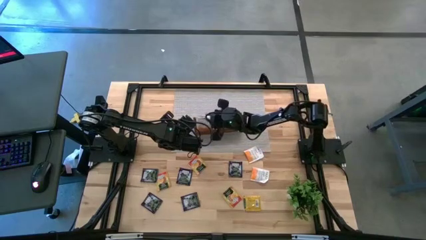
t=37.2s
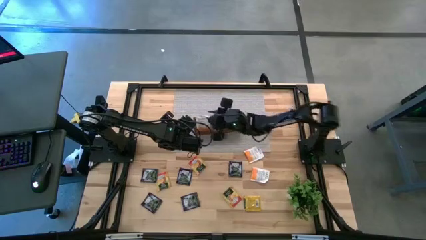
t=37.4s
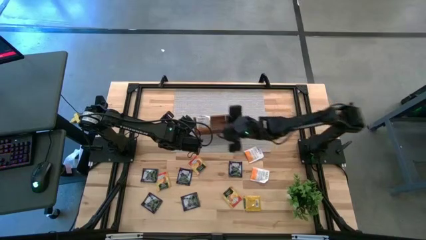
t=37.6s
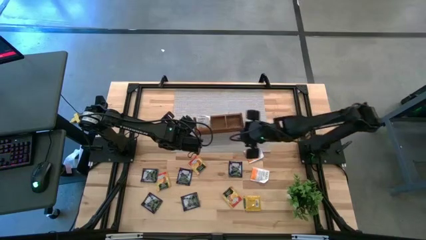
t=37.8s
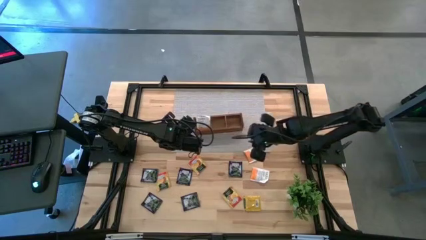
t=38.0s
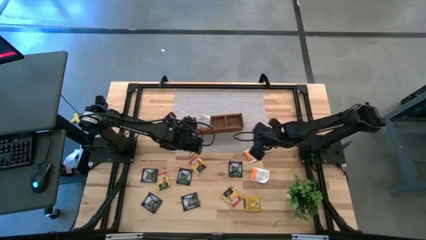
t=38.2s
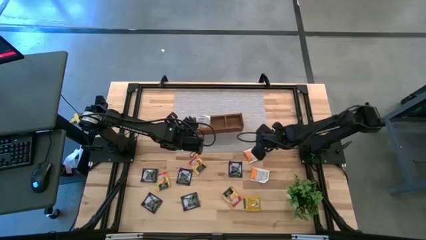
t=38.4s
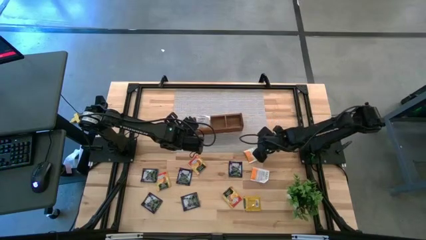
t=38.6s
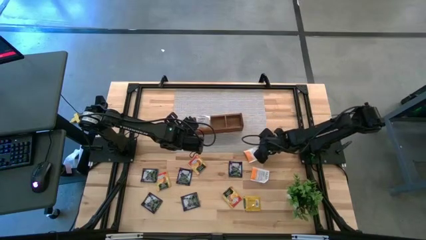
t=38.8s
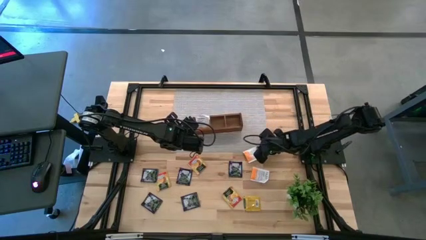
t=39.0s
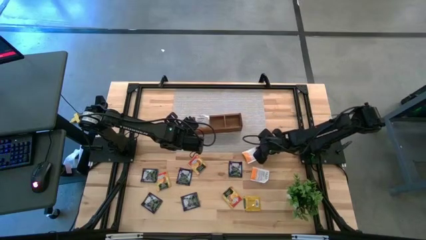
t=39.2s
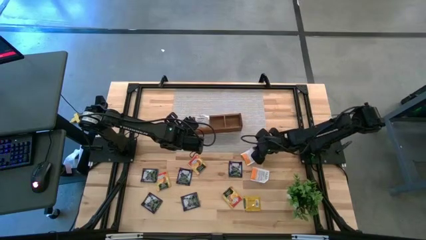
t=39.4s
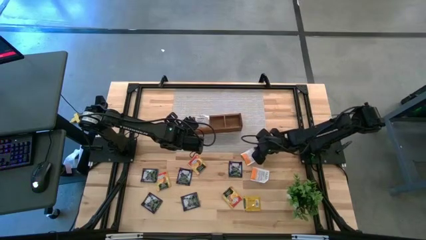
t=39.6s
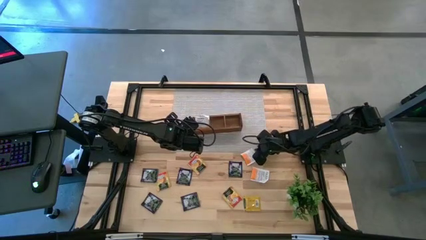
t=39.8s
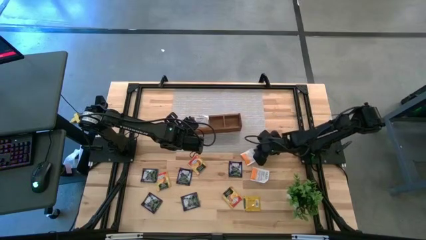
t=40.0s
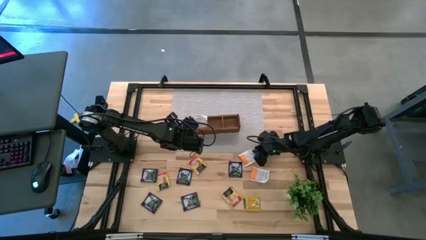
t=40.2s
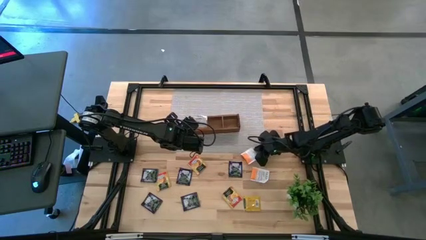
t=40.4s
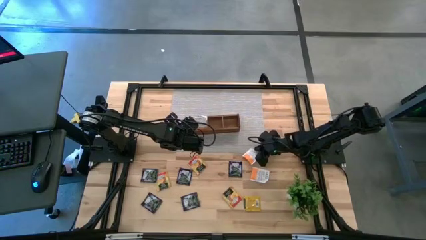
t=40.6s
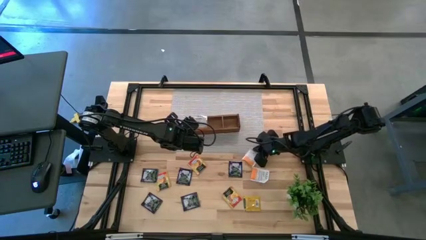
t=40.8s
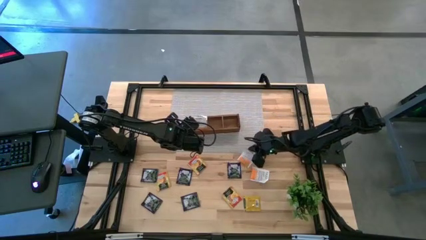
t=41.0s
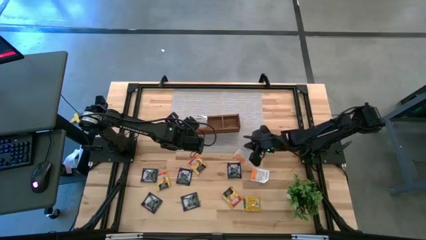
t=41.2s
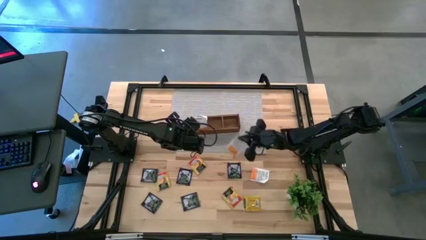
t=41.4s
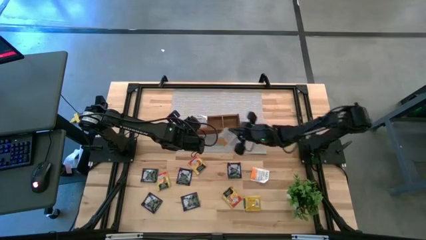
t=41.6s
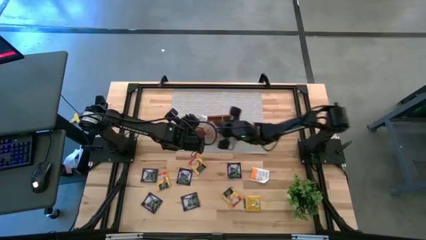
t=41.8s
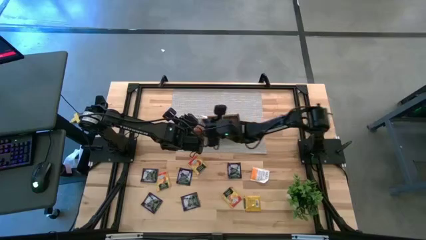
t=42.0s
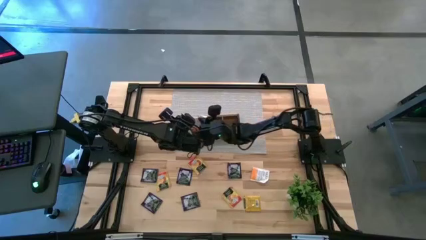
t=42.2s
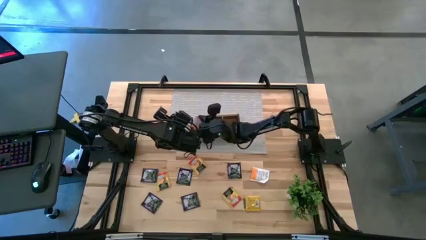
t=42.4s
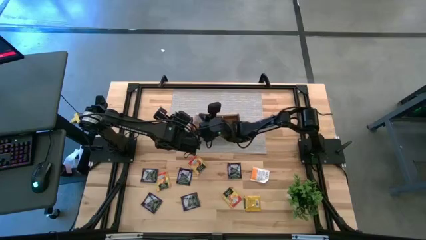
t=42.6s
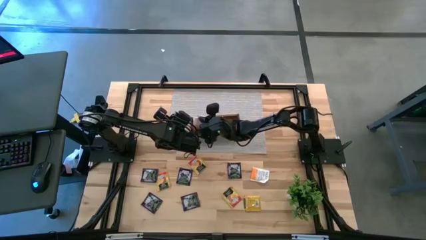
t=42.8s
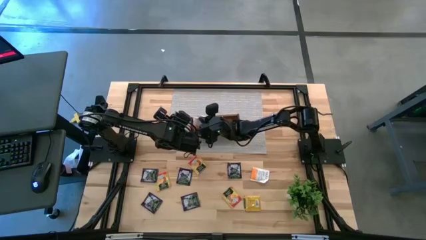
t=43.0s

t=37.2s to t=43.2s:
Task: Pick & Place Tea
Put the orange tea bag into the left section of the wooden organizer

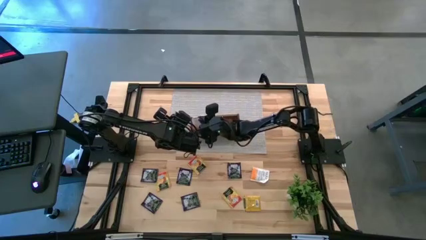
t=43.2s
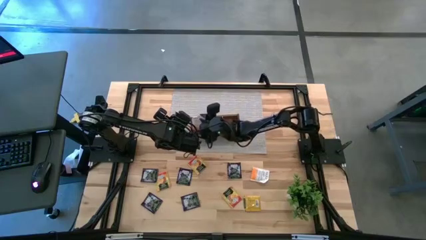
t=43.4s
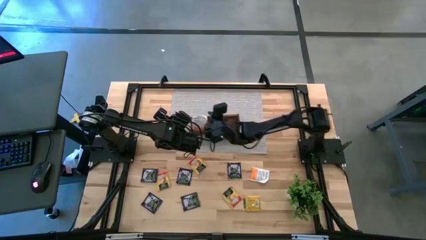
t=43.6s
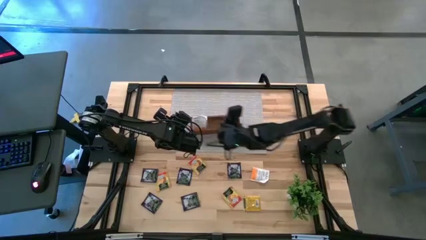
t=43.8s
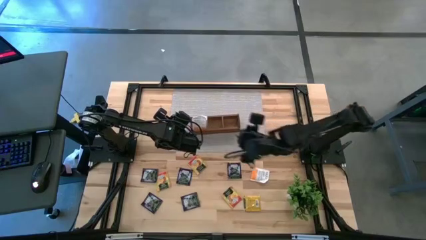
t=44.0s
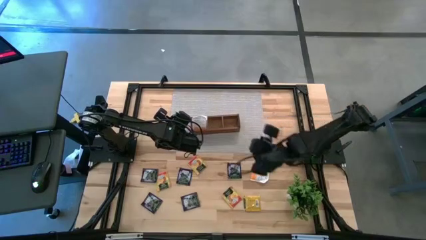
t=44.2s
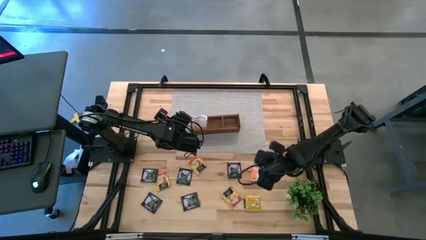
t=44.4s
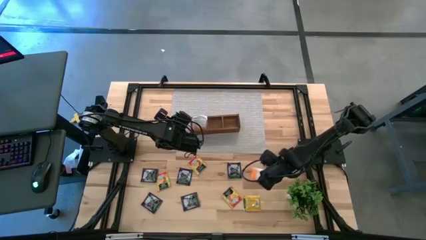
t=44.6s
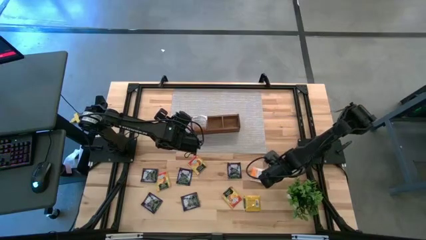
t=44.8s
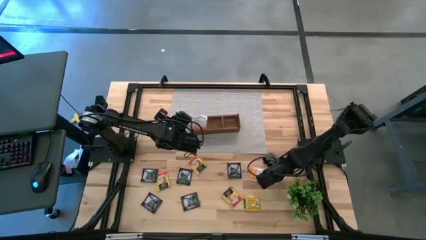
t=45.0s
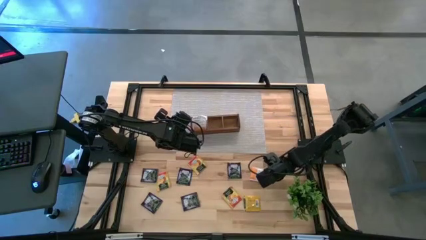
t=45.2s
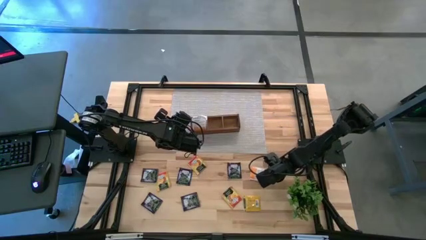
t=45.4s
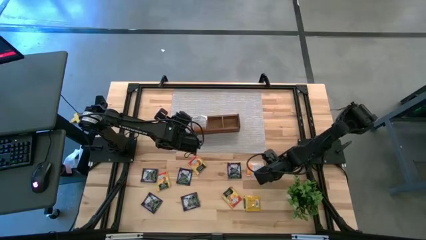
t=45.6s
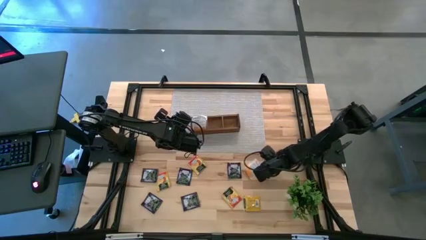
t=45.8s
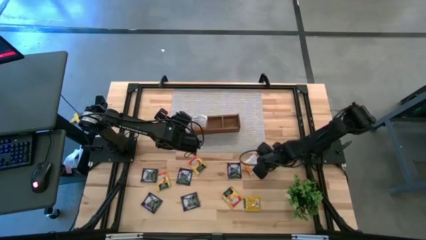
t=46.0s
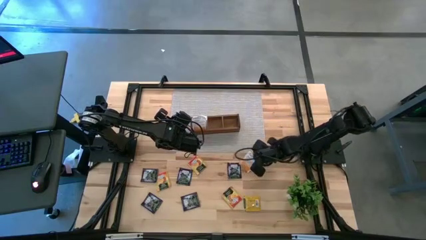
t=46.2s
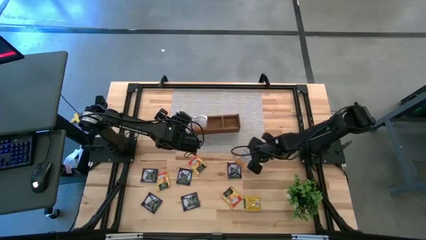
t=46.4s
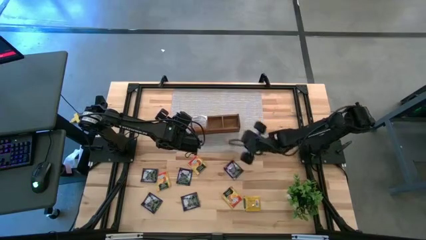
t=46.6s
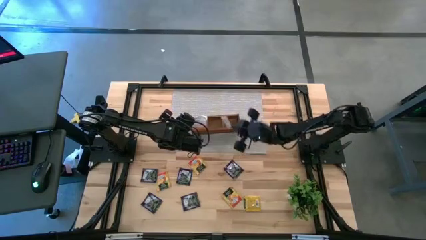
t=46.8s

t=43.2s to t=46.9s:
Put the orange tea bag into the left section of the wooden organizer

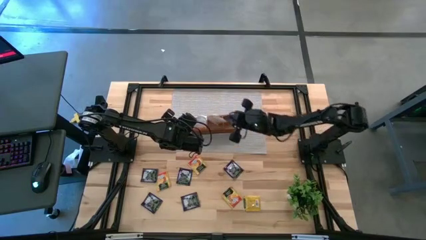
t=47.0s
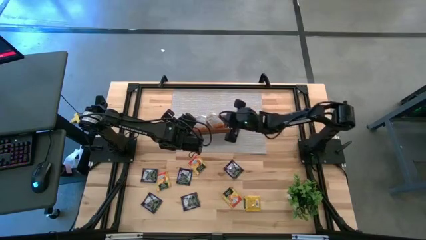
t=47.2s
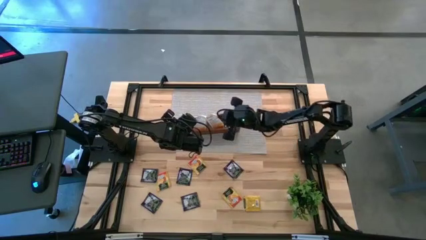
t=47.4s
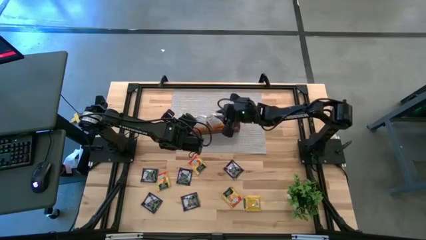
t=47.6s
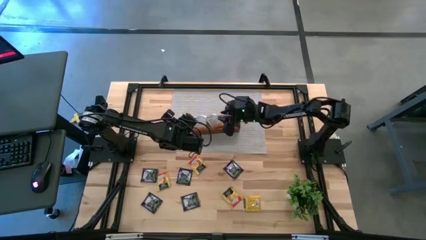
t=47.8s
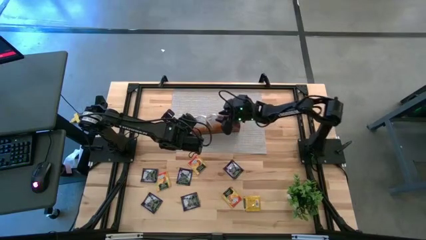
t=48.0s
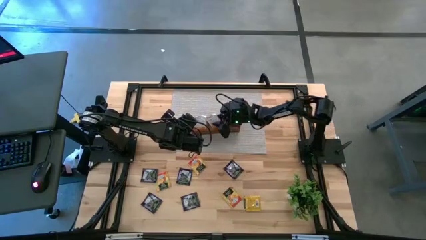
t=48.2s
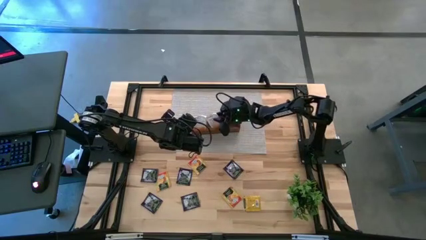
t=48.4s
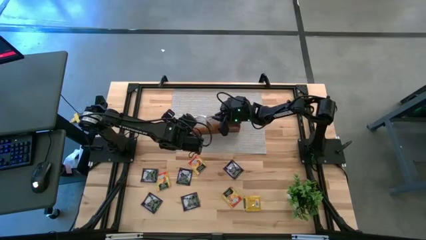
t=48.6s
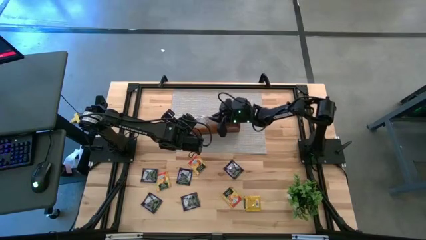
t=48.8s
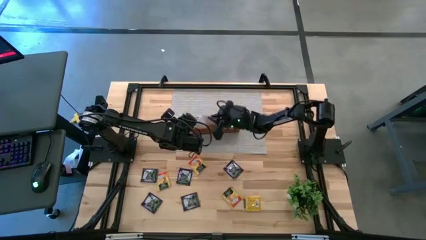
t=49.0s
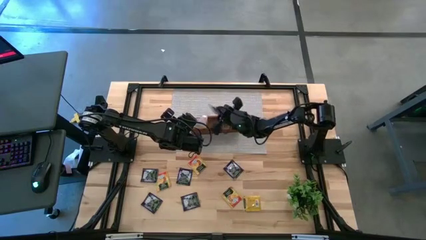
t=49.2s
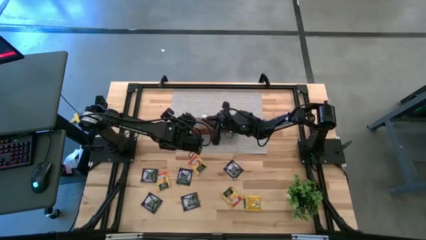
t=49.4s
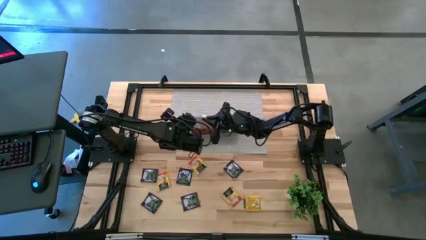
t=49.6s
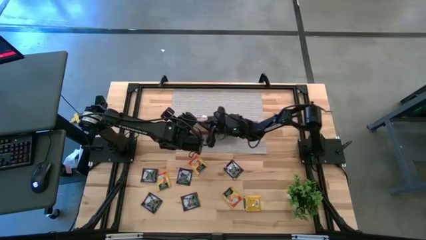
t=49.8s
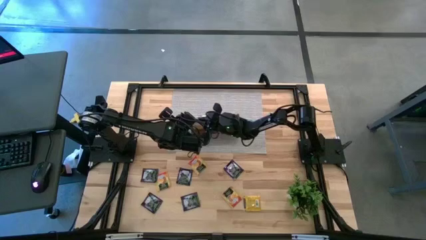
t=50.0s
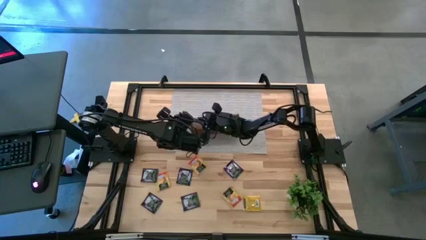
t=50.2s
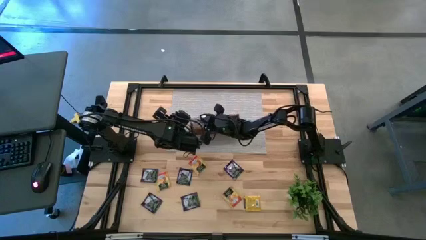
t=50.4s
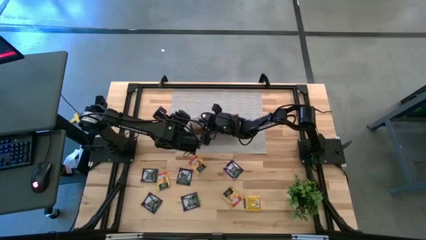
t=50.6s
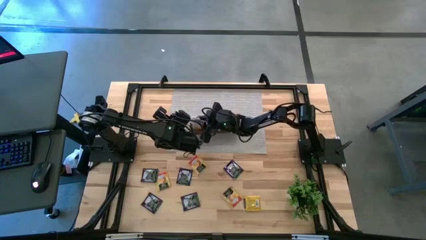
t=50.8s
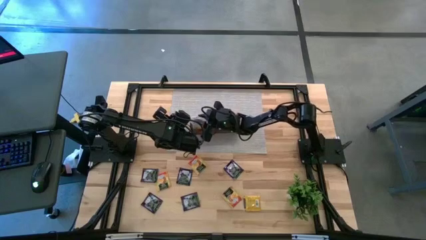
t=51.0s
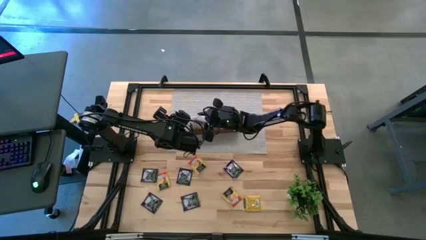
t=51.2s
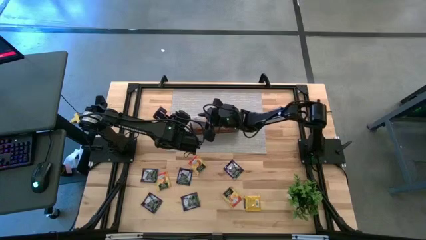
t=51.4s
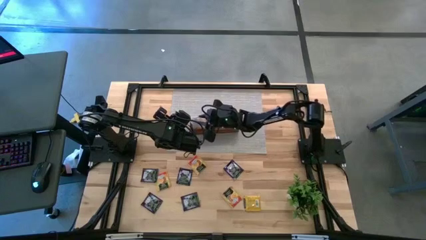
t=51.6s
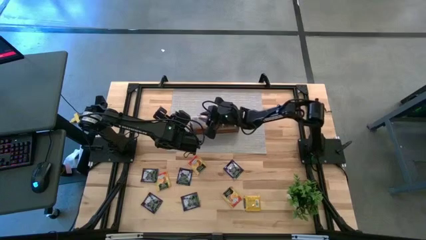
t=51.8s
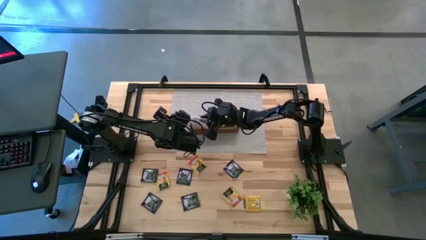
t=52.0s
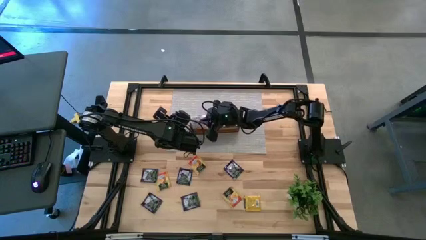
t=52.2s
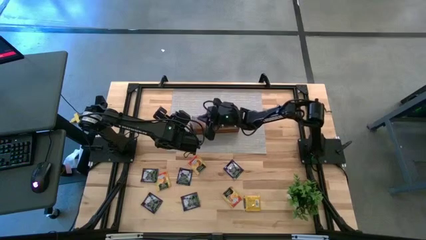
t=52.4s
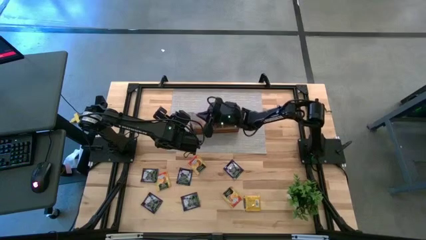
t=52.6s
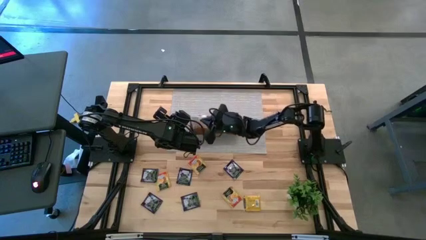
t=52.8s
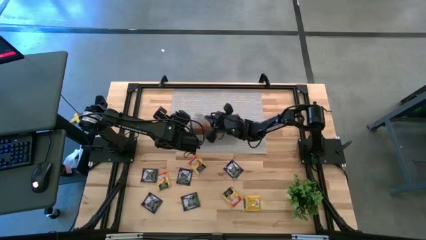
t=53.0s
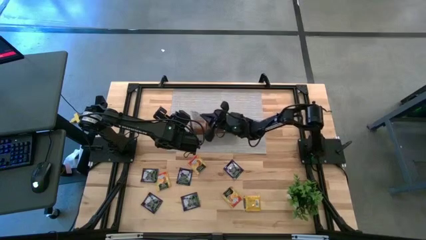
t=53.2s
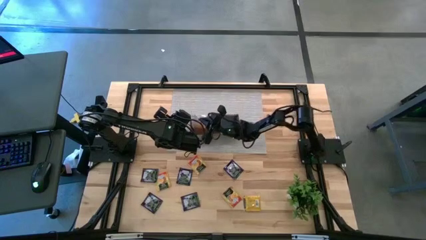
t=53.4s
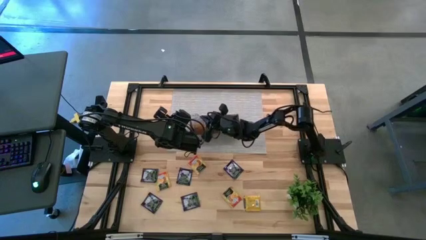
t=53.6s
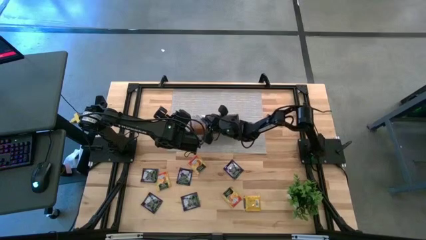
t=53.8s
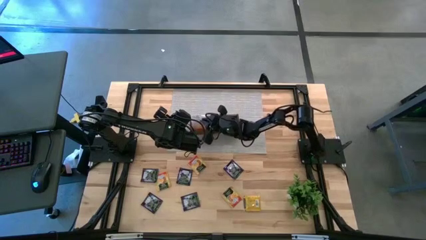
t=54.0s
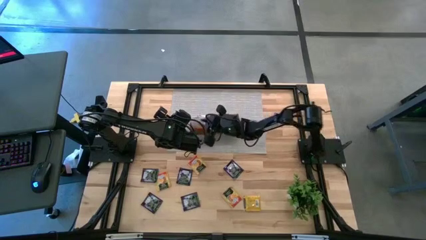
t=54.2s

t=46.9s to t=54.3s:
Put the orange tea bag into the left section of the wooden organizer
